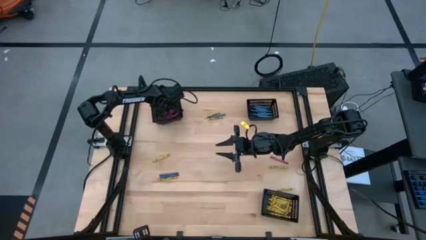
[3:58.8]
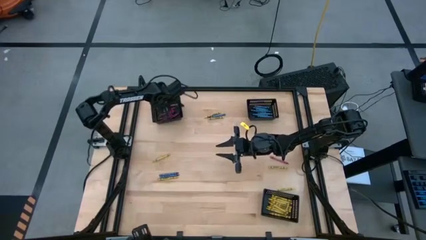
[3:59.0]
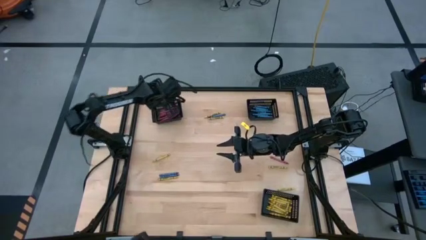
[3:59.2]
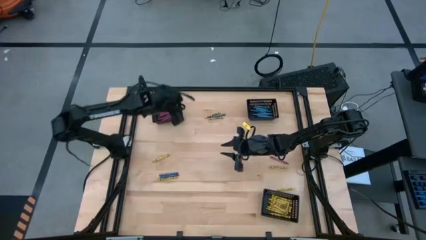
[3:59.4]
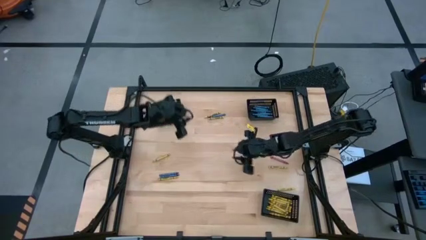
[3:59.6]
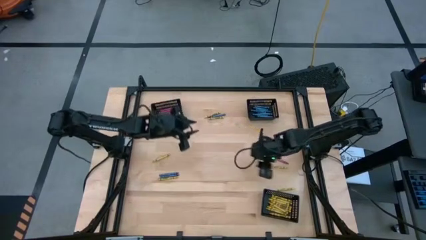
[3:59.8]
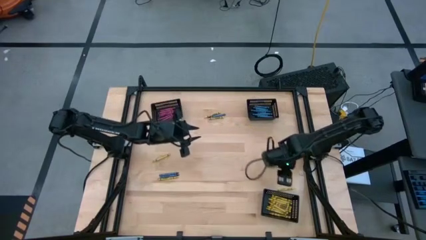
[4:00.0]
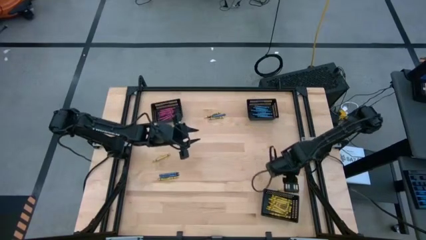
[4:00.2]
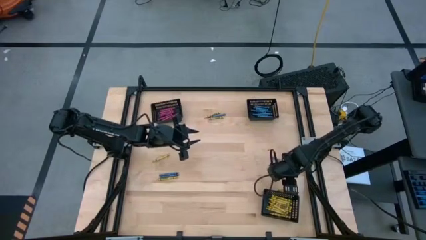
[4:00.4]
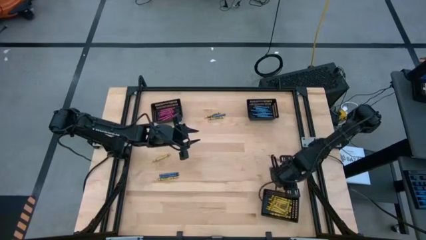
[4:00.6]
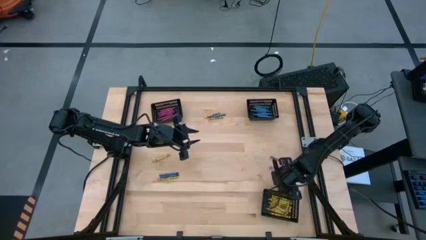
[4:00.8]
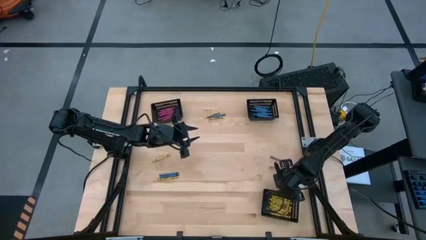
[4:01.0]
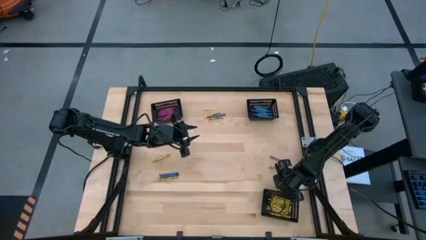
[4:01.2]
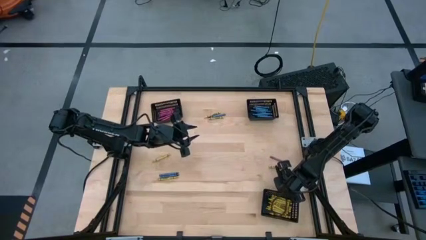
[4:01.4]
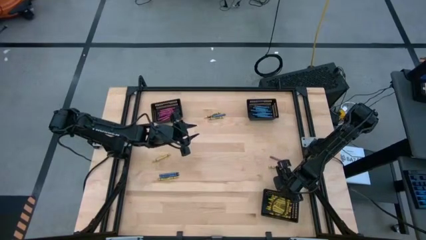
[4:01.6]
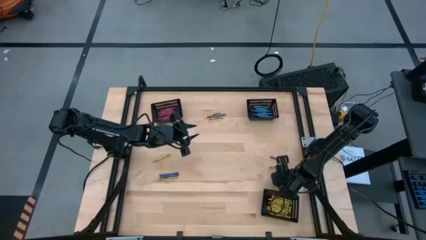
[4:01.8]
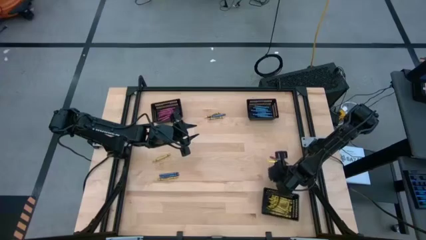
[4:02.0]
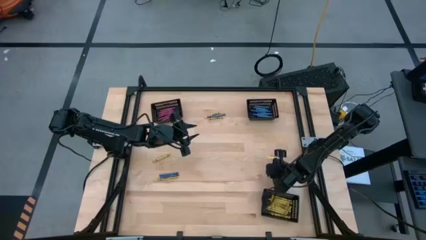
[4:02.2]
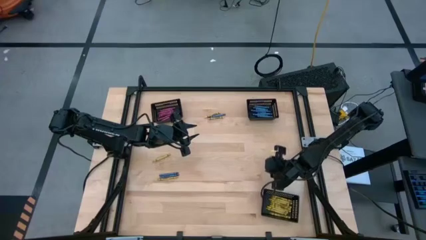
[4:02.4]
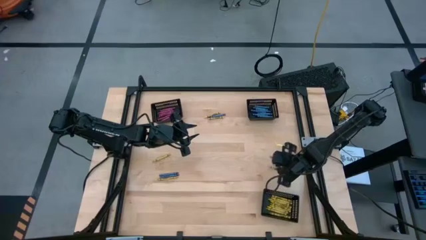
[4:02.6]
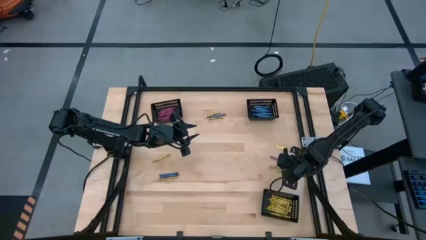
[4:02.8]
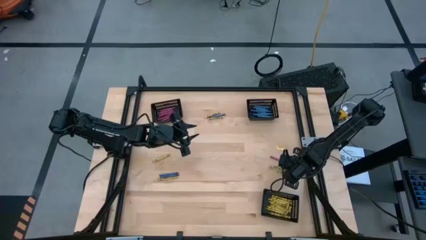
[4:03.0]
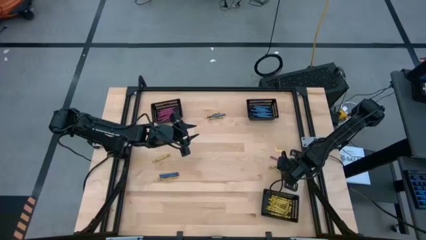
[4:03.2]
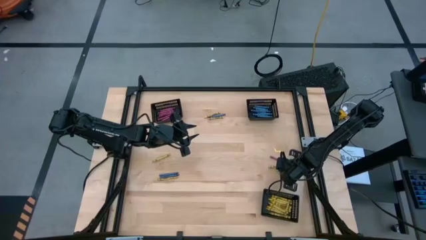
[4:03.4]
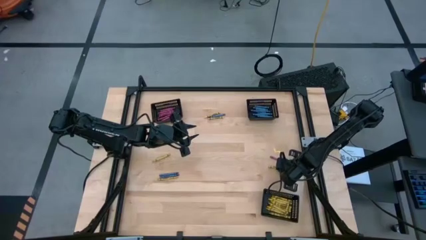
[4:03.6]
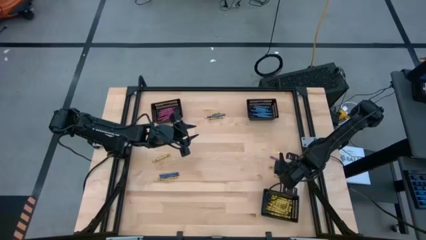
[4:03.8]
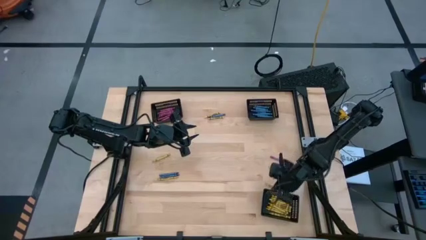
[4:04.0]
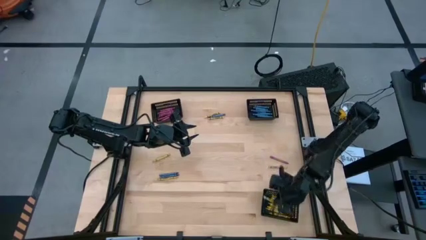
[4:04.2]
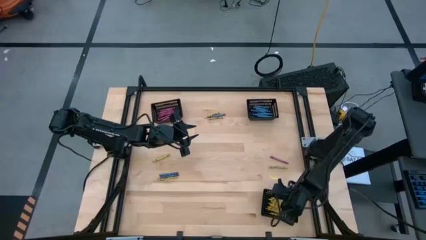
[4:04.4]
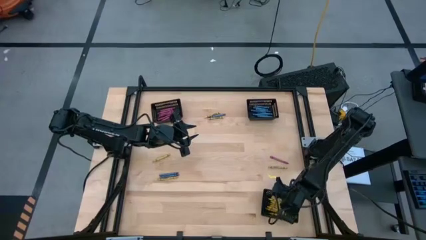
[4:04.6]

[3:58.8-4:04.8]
Task: Sort crayons
Put the yellow crayon into the bottom black bin

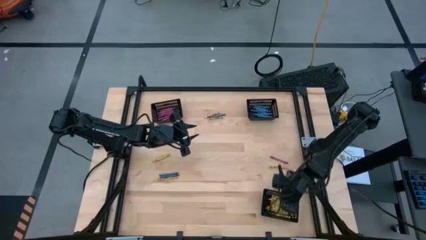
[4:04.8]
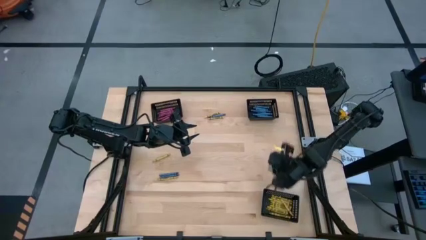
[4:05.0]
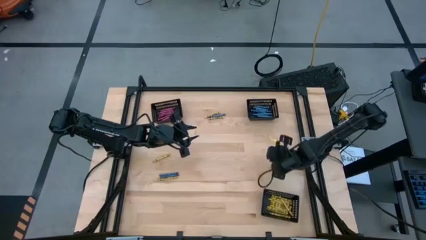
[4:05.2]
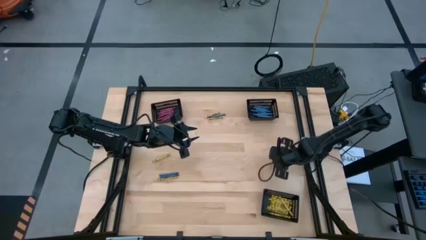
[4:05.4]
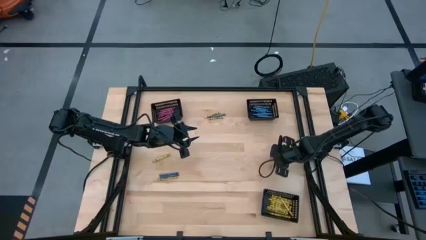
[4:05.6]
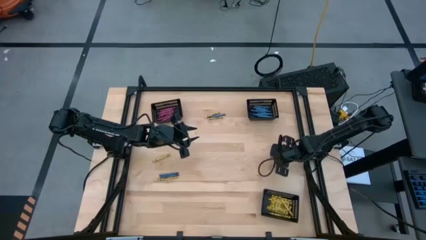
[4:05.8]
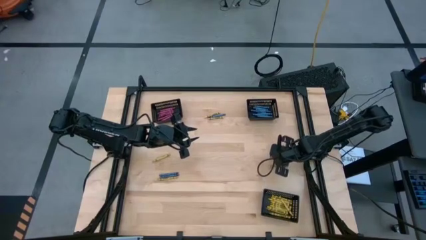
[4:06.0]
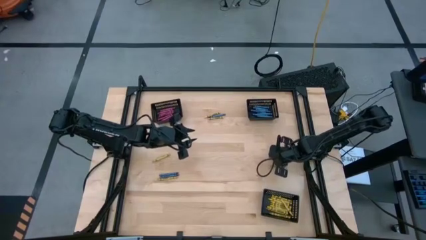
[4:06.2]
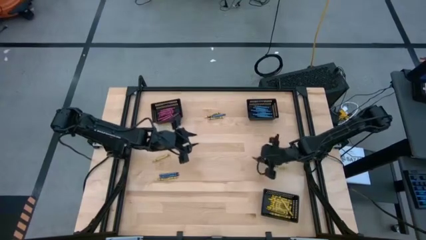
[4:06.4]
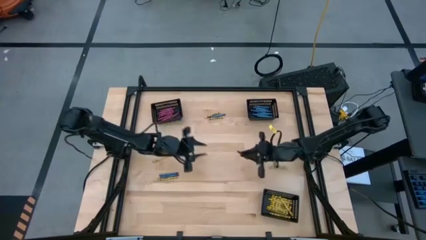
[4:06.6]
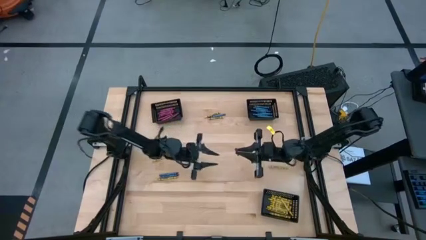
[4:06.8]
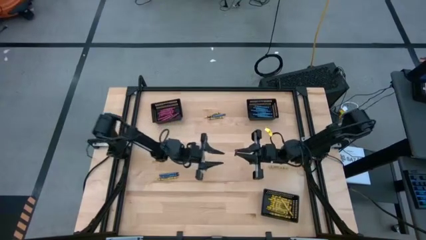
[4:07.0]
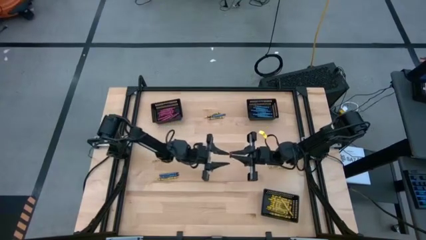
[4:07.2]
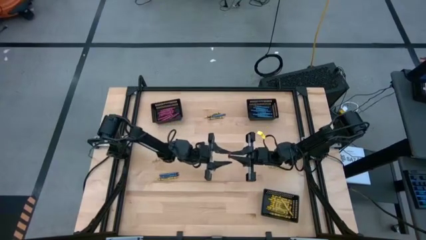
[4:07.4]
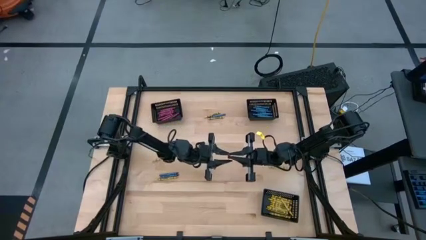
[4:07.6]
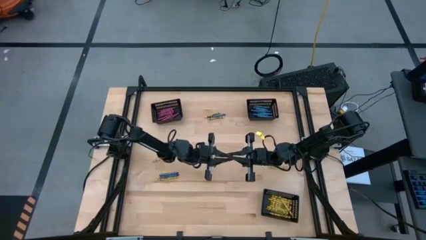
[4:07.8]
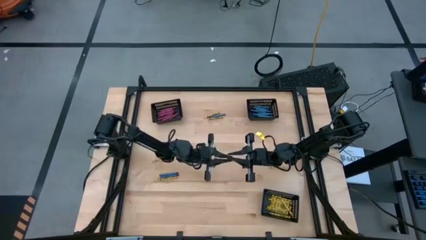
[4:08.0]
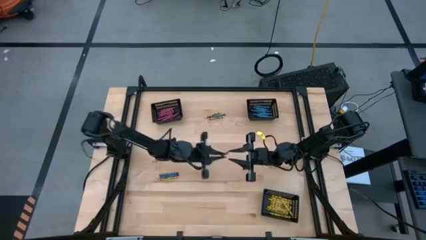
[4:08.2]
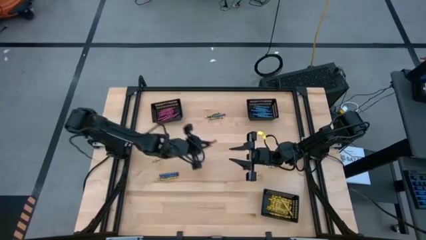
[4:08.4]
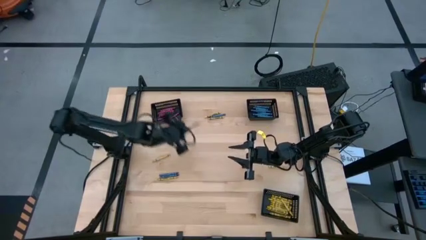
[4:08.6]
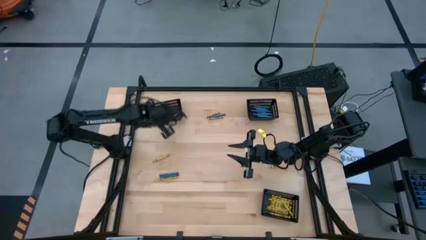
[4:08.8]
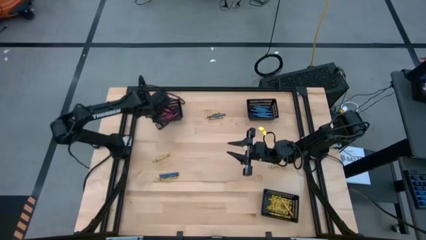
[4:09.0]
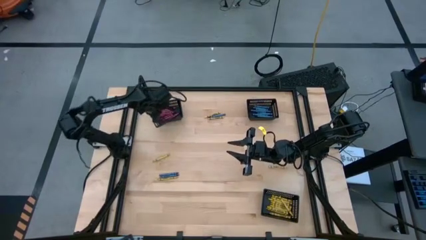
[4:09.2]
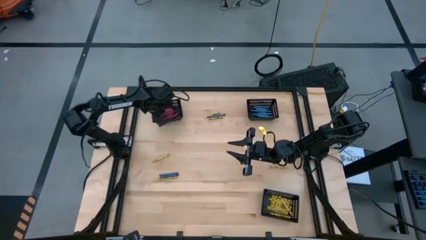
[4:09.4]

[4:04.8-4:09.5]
Put the red crayon into the top left black bin
